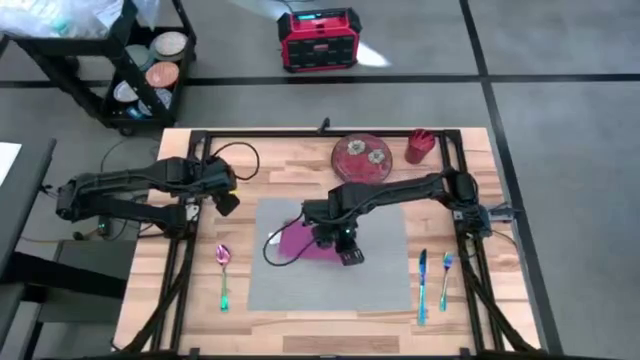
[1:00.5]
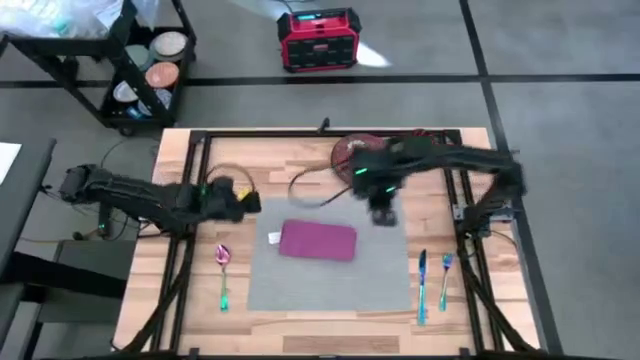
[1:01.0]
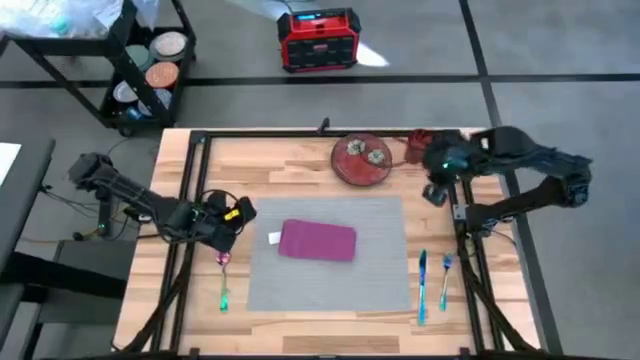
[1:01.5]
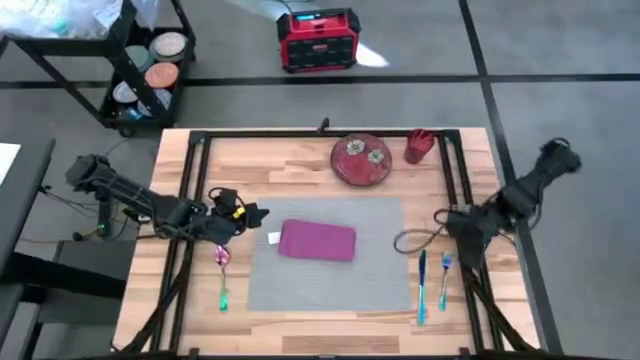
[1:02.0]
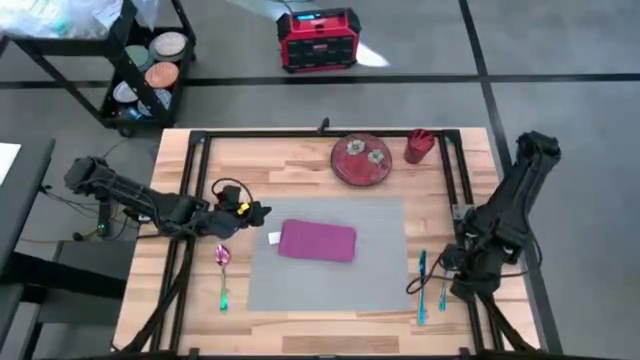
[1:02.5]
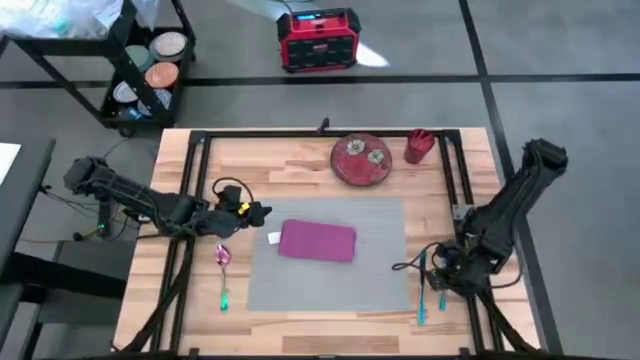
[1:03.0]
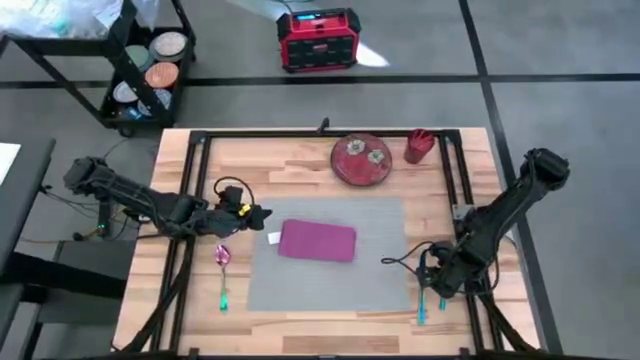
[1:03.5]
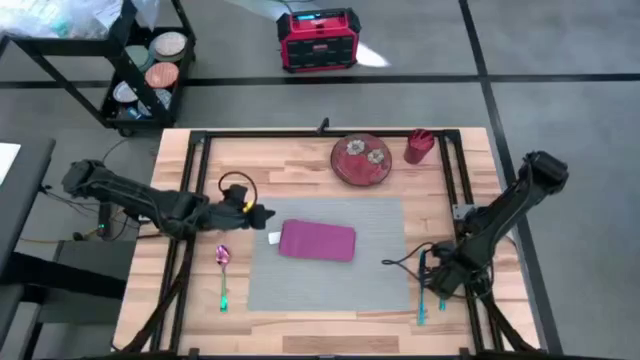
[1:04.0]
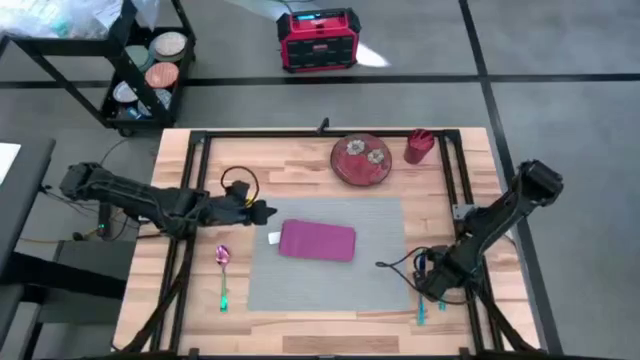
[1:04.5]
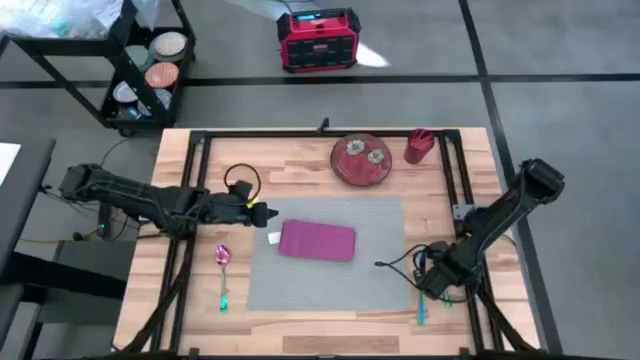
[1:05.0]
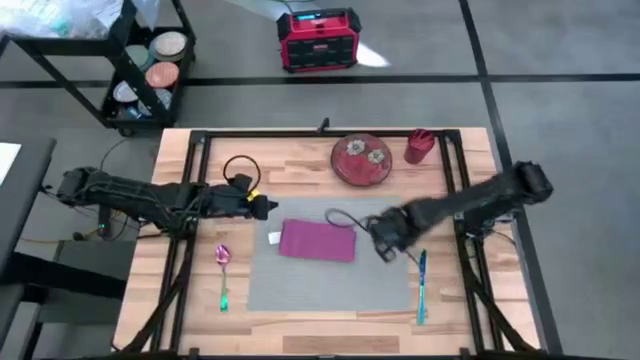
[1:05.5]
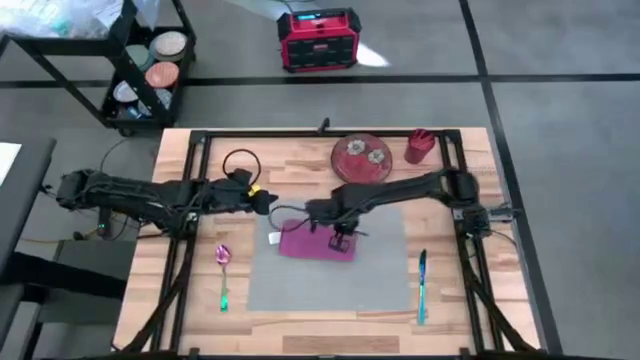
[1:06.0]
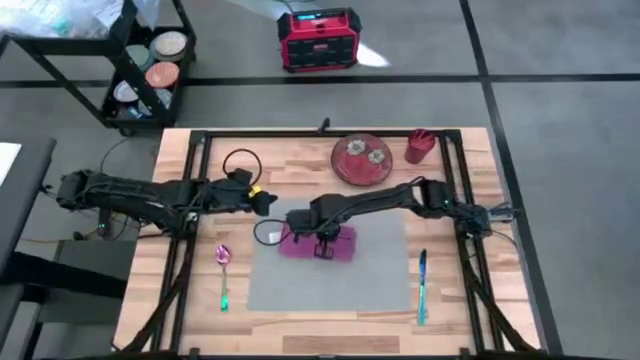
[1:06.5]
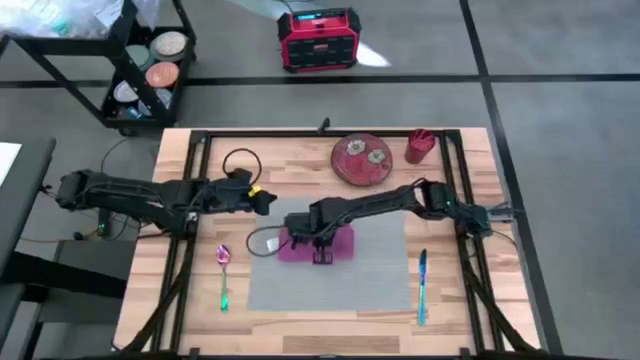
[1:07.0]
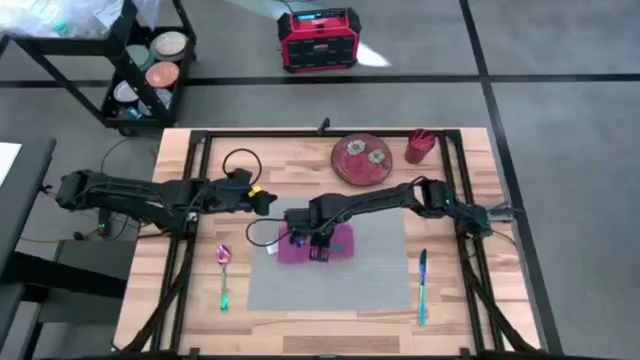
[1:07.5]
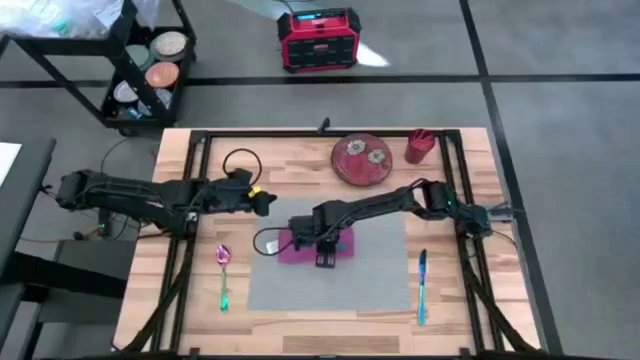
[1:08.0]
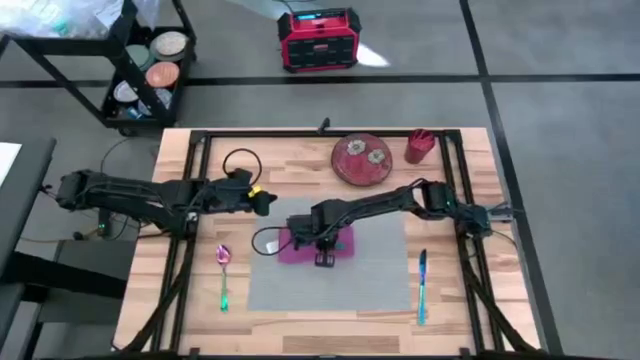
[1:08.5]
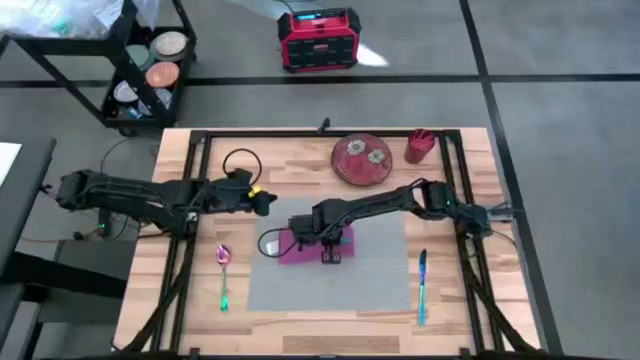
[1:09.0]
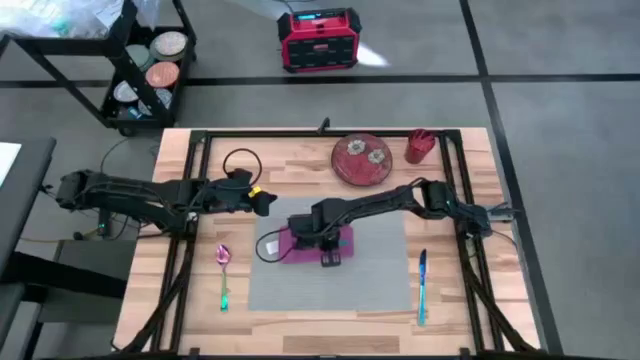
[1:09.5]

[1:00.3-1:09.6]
Task: Set table place
Put the blue fork on top of the violet table napkin

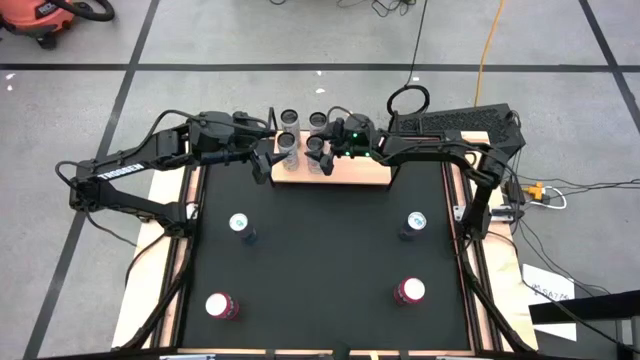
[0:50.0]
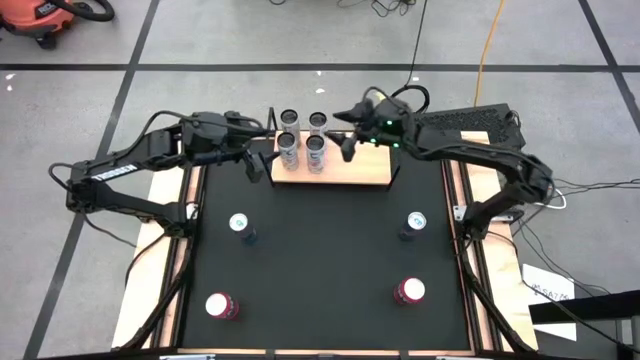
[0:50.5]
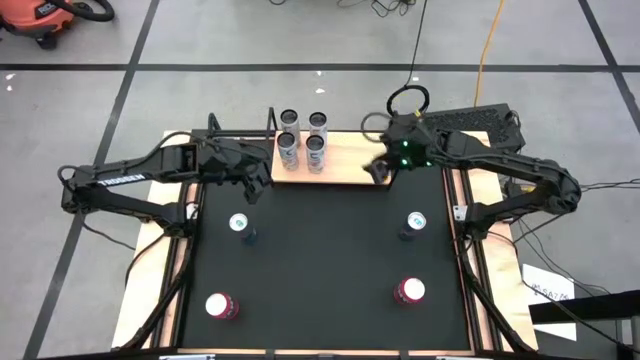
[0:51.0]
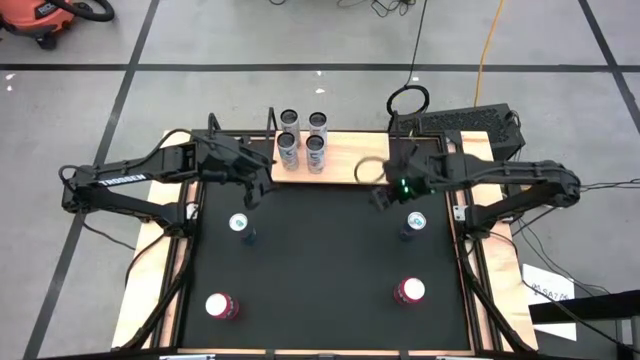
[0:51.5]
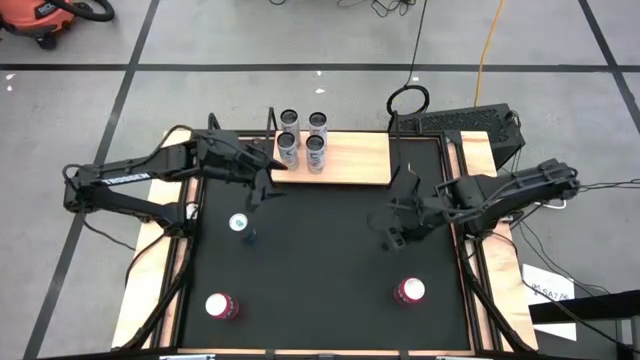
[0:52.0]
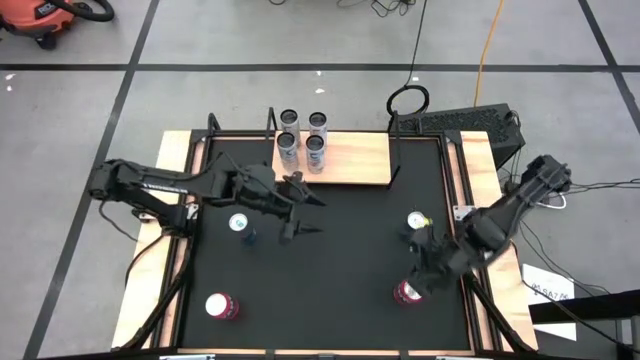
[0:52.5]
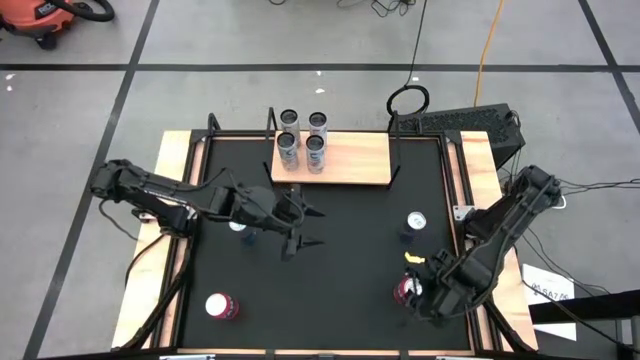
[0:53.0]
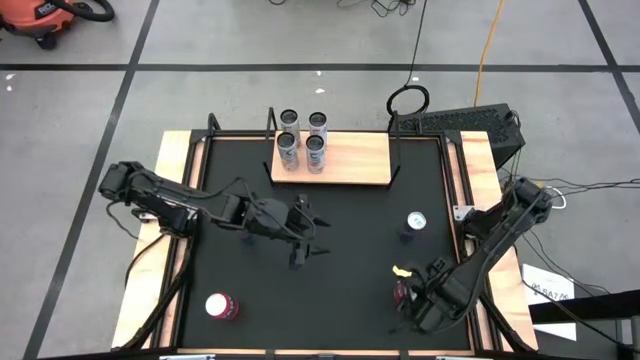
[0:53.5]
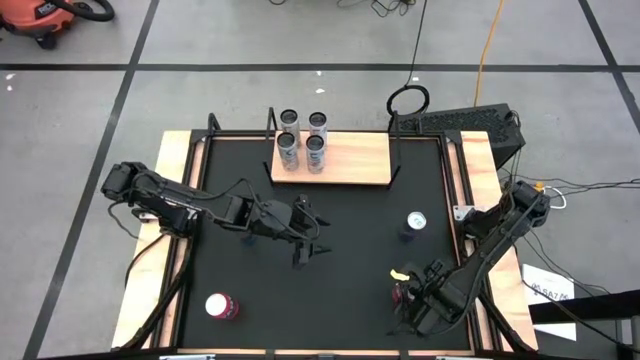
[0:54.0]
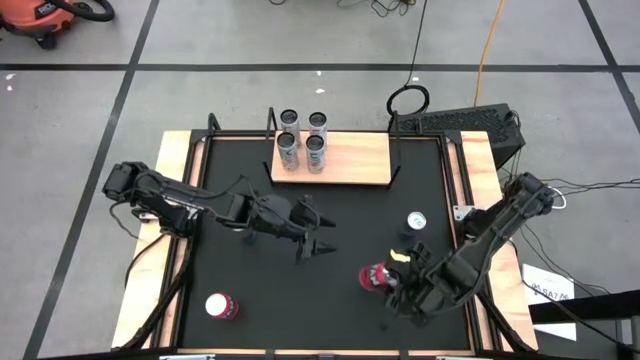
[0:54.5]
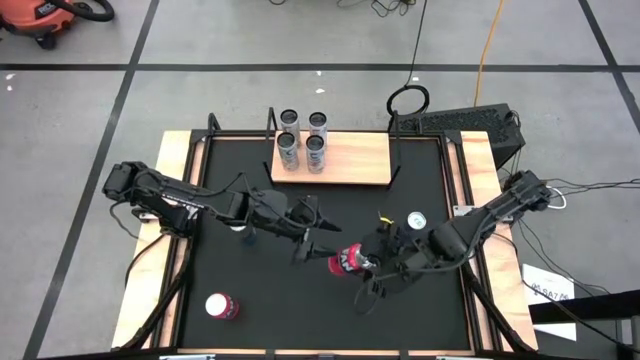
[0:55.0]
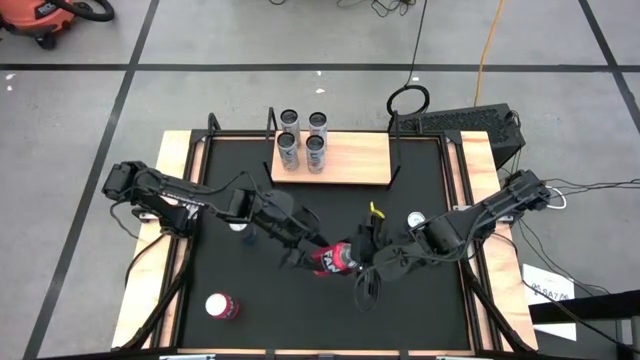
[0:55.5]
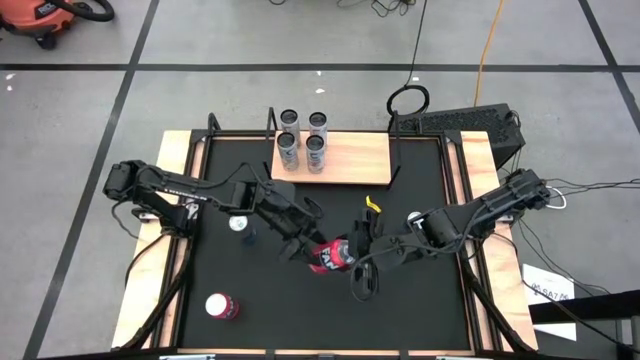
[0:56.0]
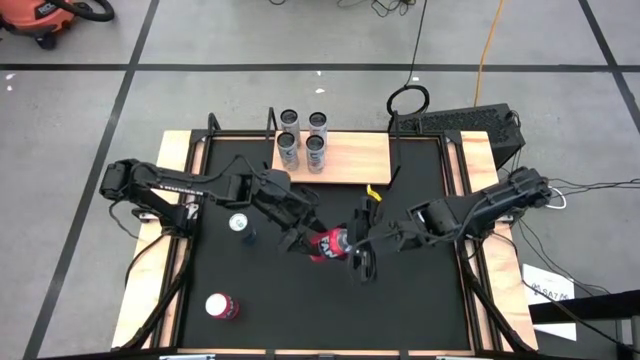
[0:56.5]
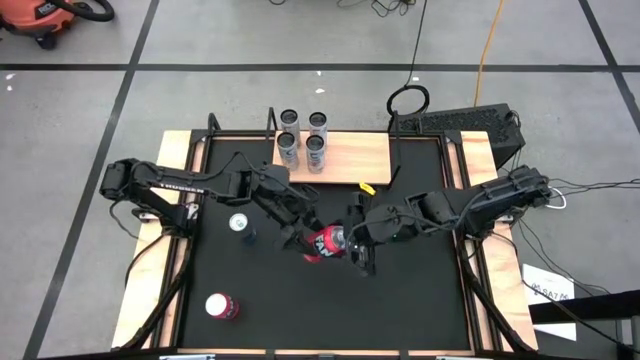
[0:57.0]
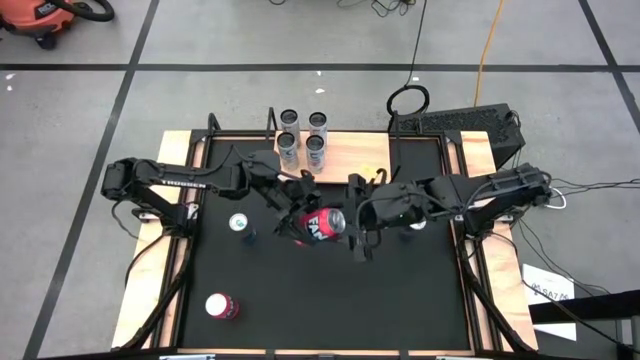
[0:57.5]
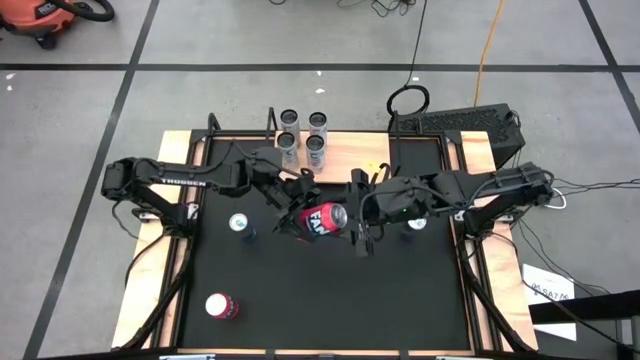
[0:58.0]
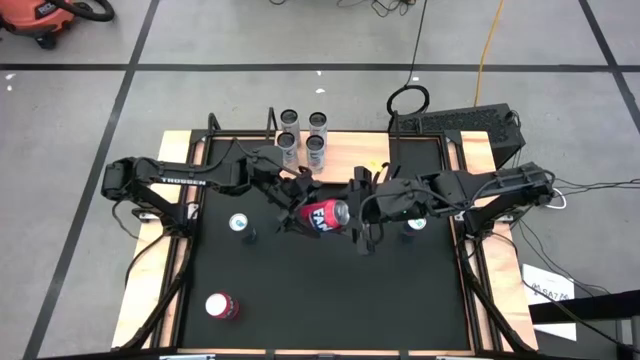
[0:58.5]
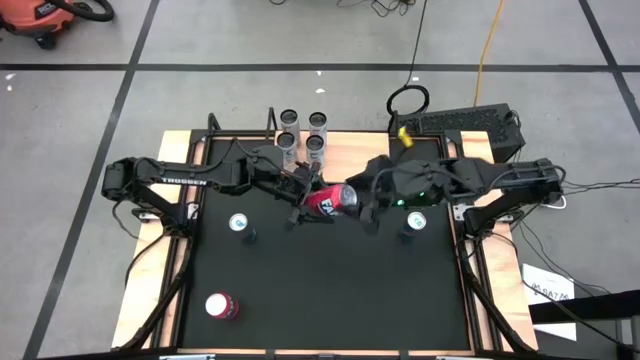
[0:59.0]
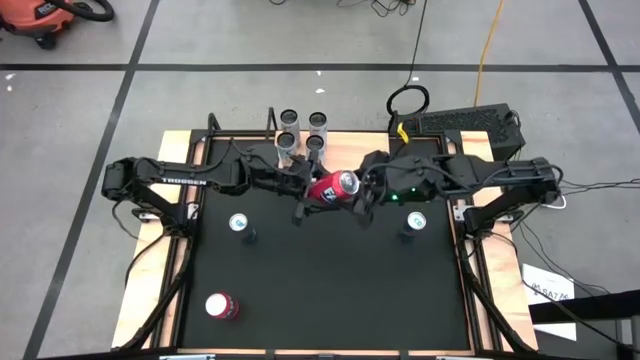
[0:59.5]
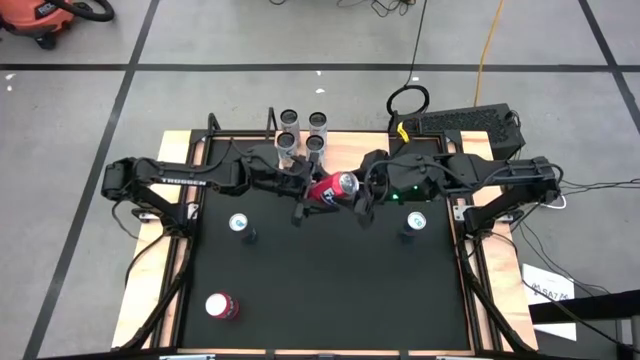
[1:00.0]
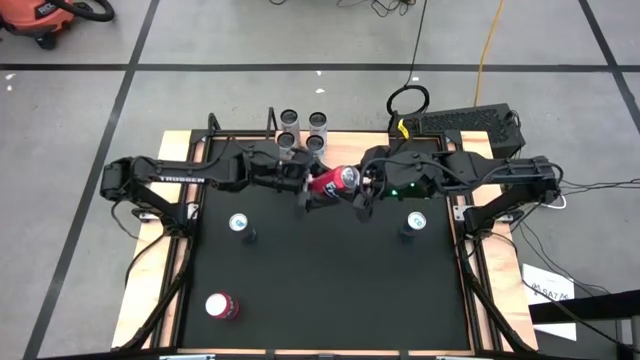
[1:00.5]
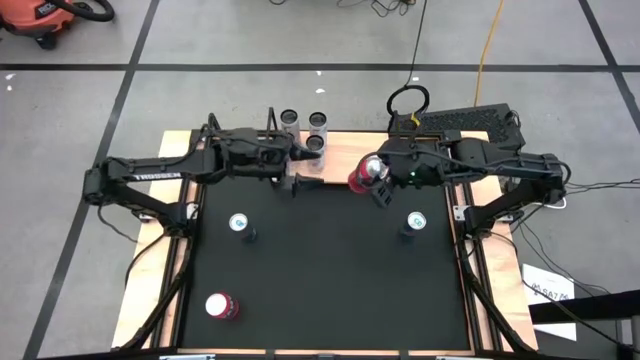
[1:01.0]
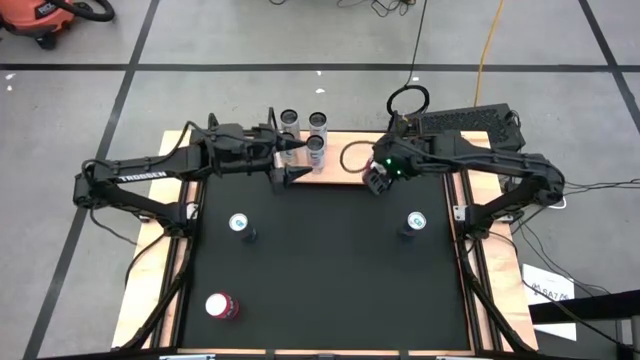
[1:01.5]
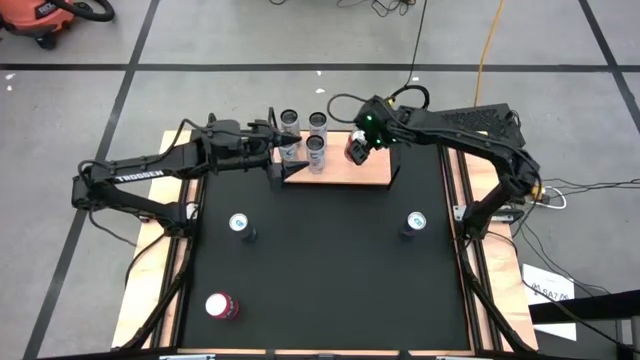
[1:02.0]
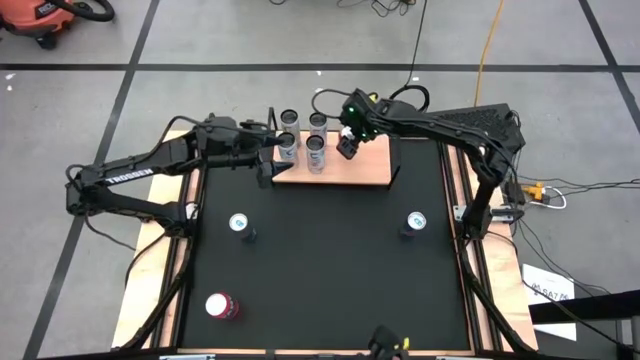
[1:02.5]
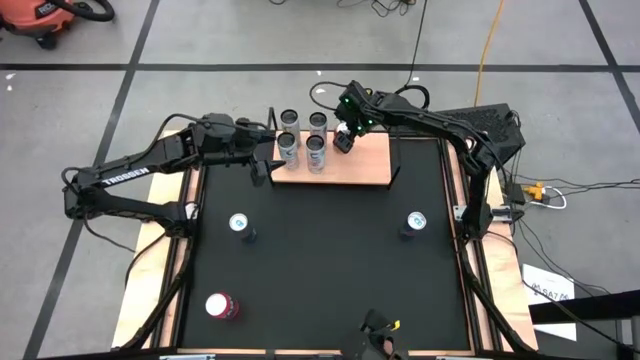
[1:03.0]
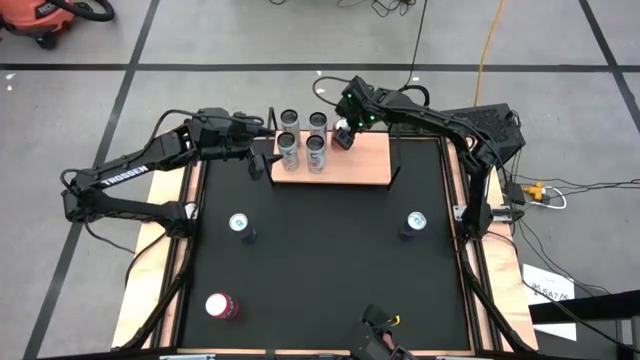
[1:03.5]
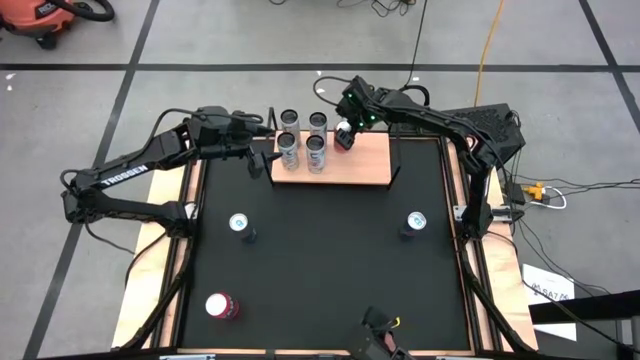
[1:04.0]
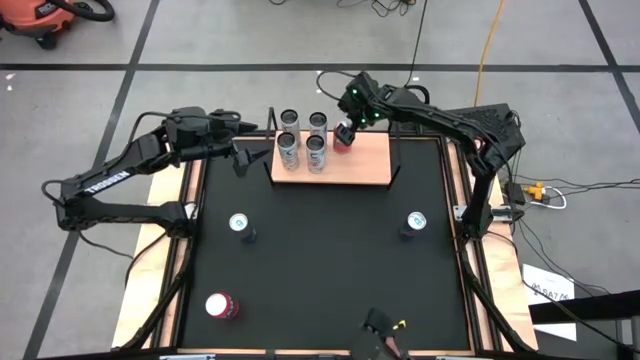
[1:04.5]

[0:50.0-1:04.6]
Task: Place canned beverage on shelf
Put the right red soda can on the shelf
